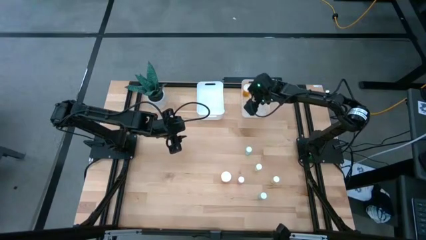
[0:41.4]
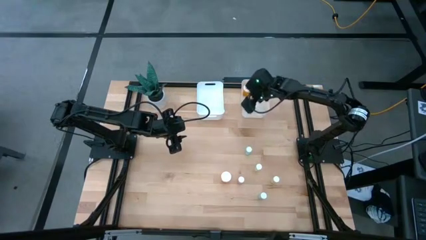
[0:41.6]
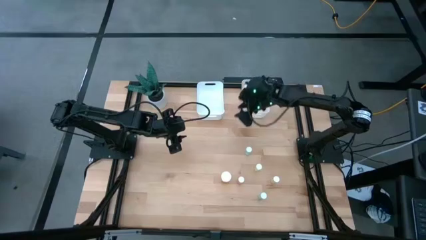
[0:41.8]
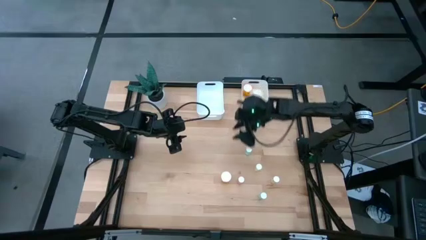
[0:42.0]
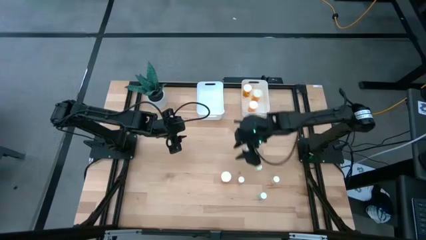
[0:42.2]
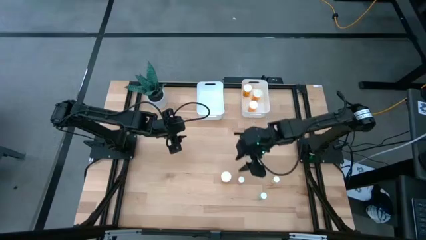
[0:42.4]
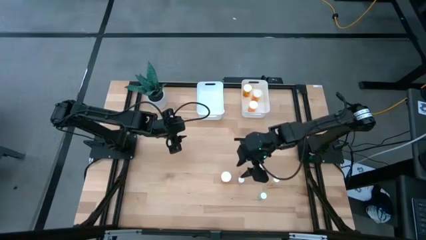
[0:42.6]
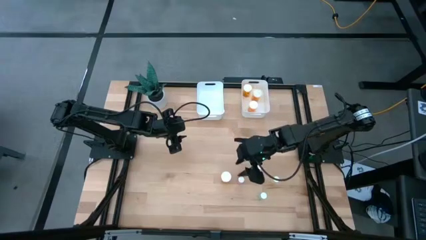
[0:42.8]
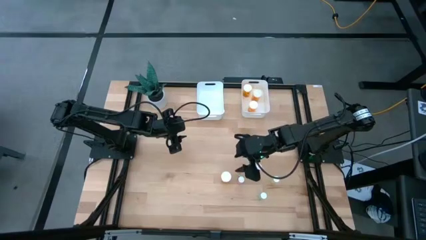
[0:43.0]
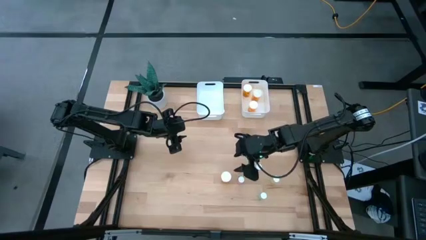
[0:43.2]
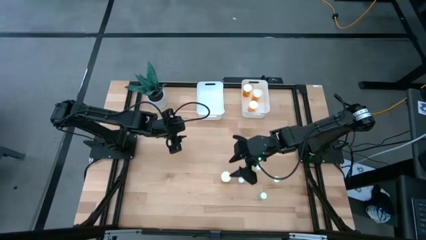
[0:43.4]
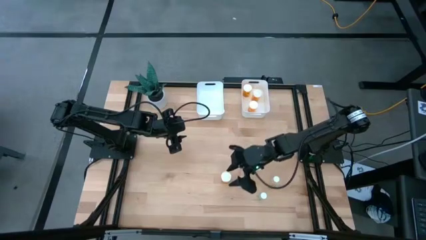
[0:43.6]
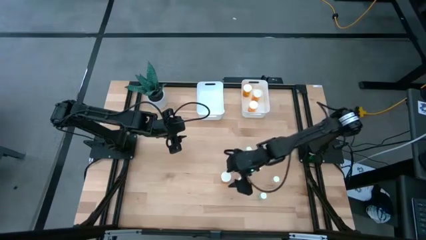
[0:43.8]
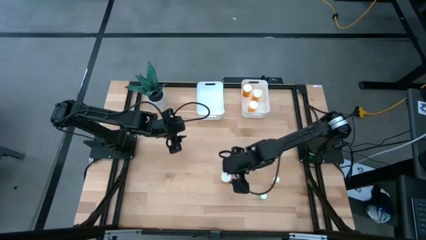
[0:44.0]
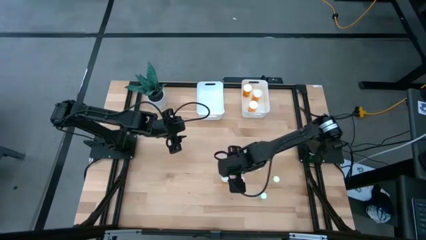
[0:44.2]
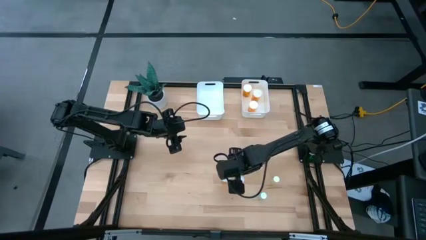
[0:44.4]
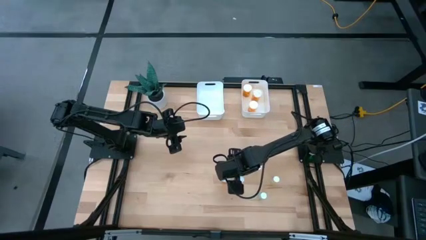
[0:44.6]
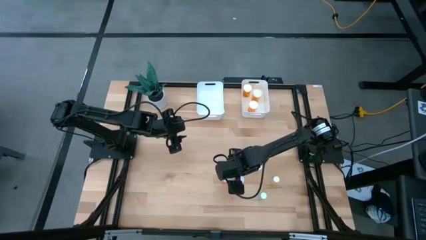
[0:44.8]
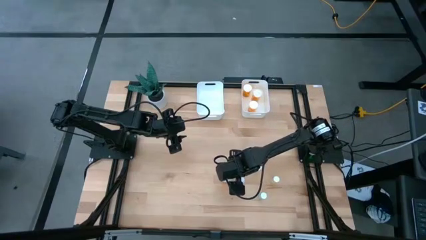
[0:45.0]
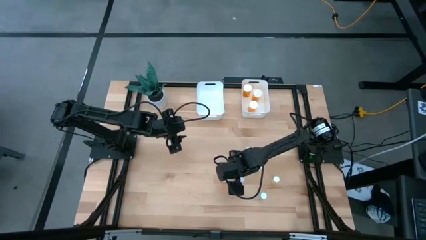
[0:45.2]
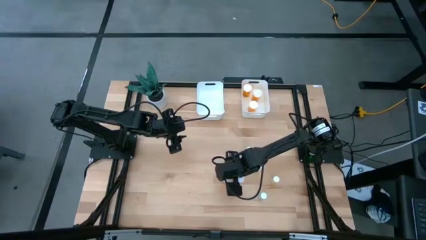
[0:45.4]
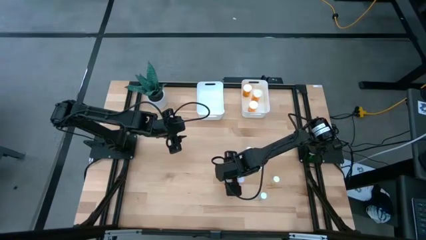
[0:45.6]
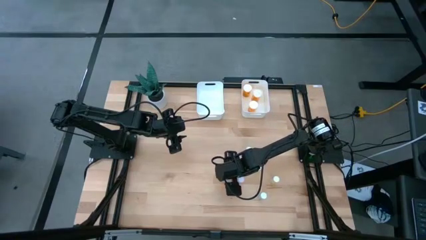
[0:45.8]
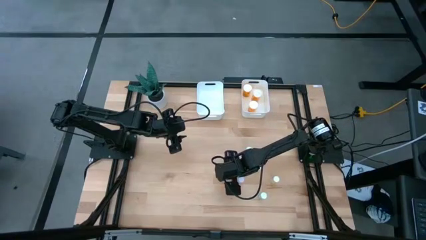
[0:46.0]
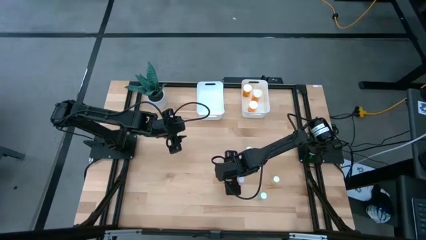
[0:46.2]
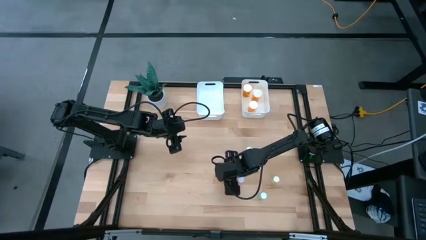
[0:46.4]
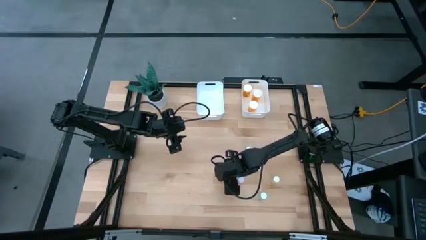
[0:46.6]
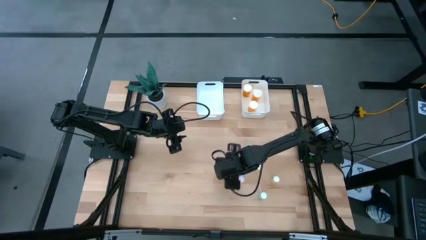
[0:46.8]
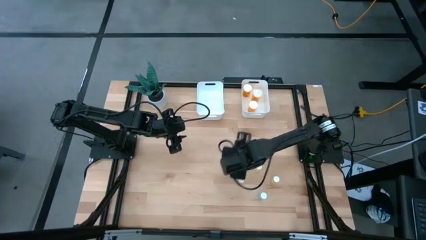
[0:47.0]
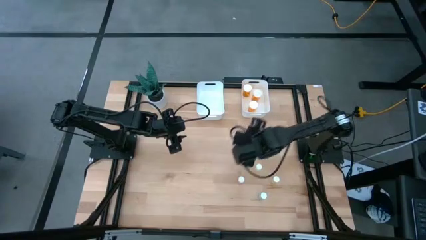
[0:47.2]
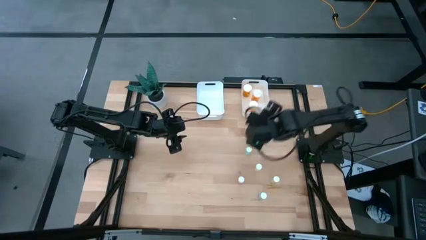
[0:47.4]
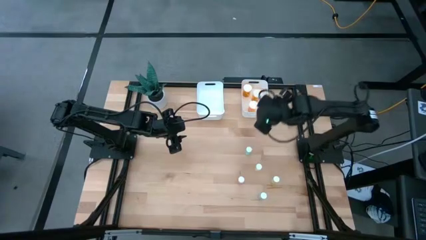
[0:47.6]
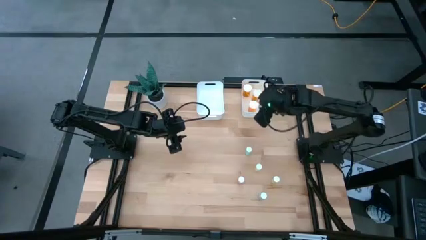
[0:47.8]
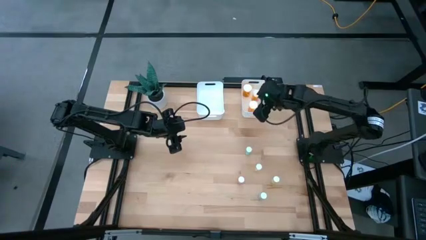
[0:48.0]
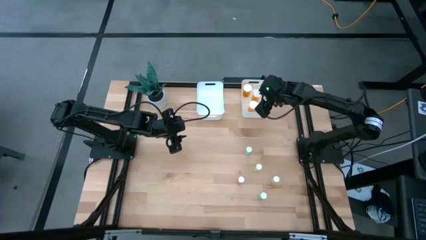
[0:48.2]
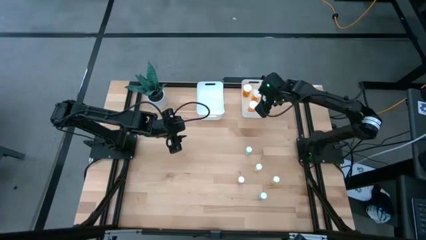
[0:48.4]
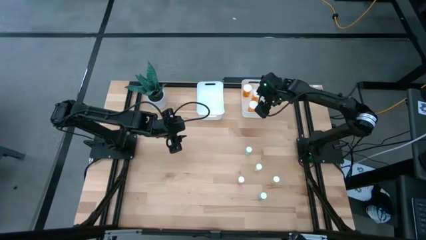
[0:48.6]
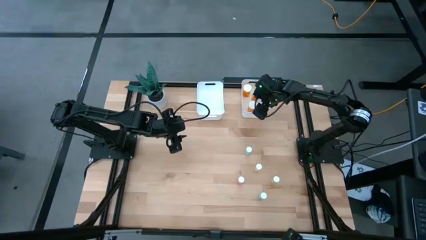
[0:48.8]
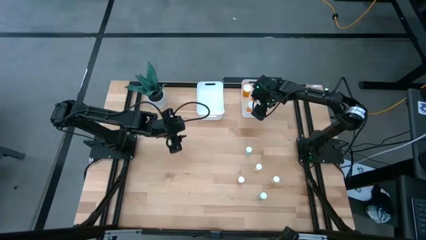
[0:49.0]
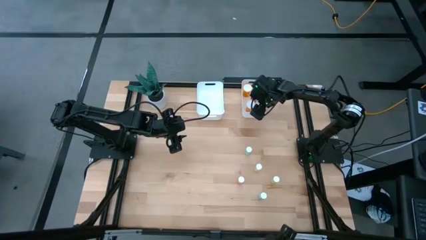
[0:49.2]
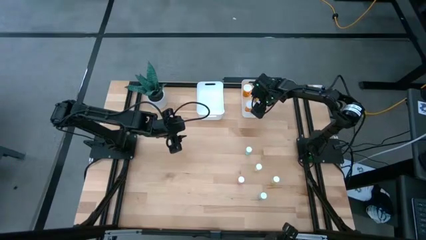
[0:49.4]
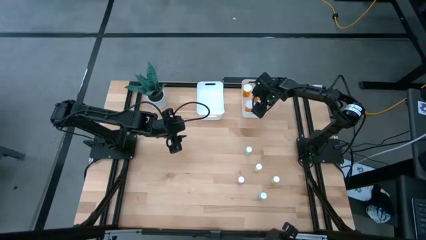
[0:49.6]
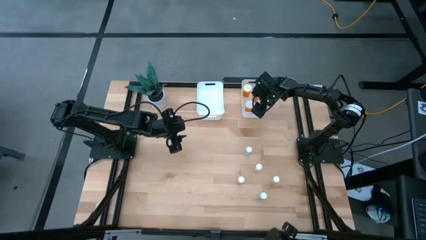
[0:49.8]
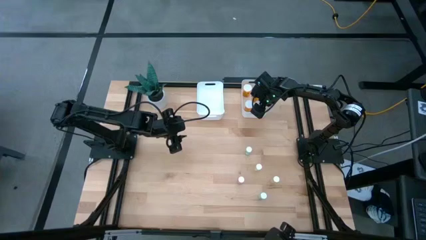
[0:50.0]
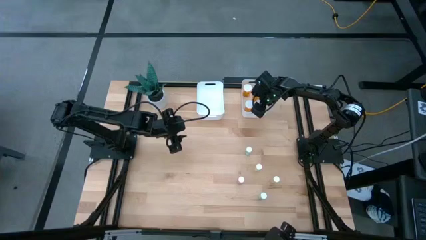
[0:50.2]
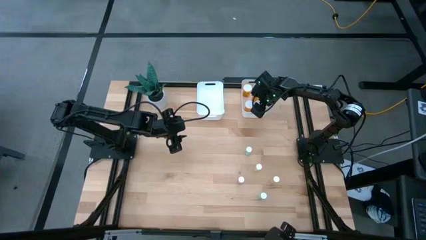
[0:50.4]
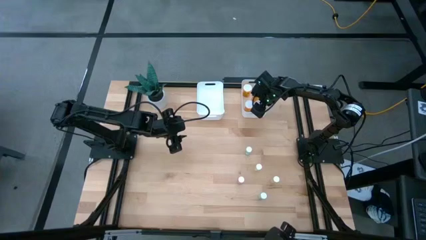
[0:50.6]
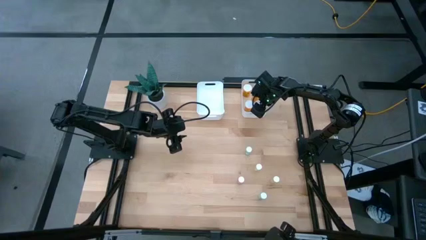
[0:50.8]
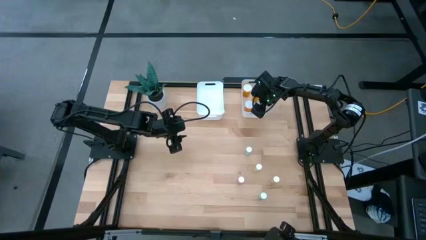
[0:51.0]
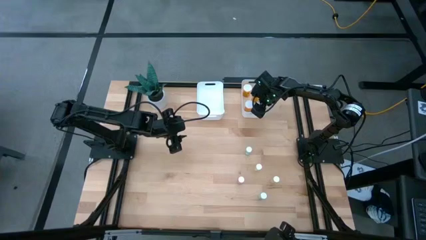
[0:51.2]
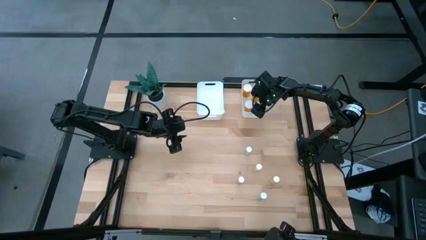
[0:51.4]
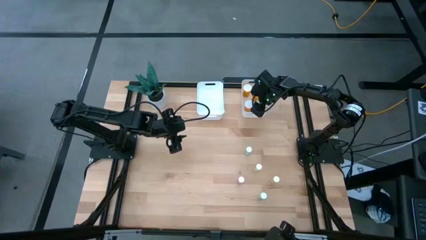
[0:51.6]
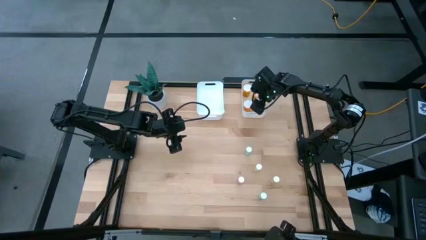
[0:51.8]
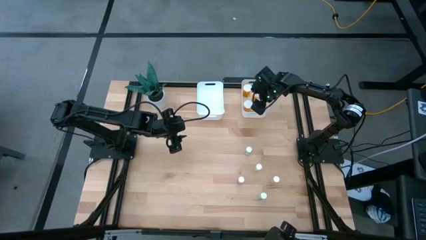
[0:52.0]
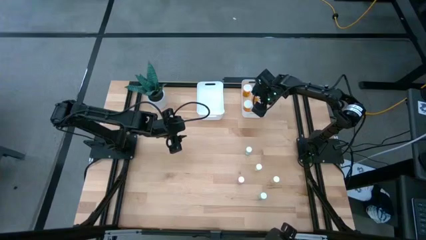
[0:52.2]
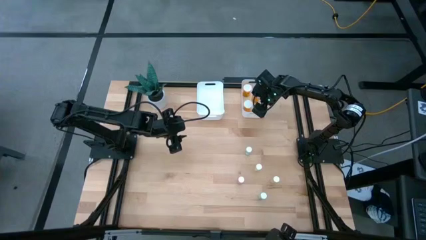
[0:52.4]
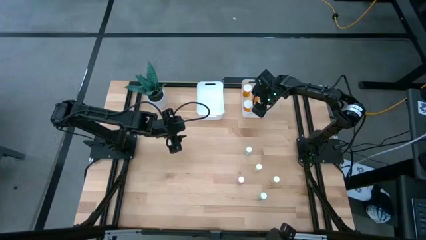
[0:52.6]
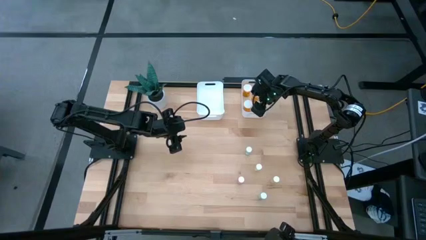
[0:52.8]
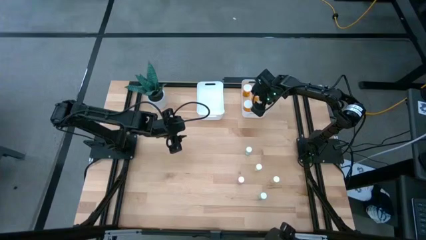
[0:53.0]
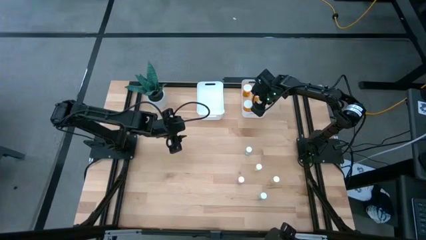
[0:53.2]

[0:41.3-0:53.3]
Task: Pick and place medicine bottles into bin by pill shape (circle, oval)
Put the big orange bottle into the right white bin

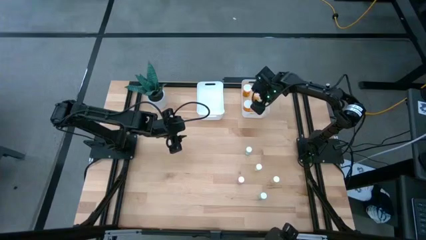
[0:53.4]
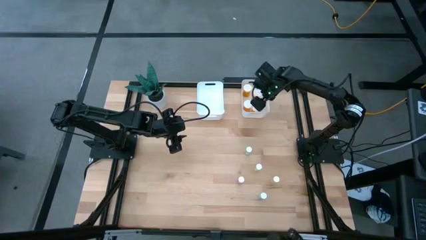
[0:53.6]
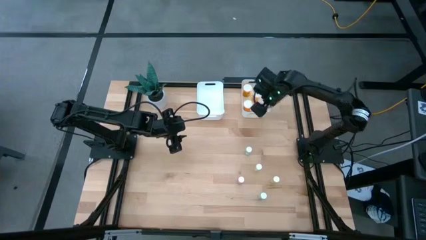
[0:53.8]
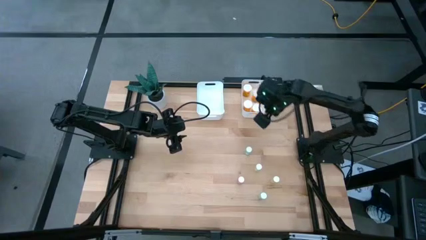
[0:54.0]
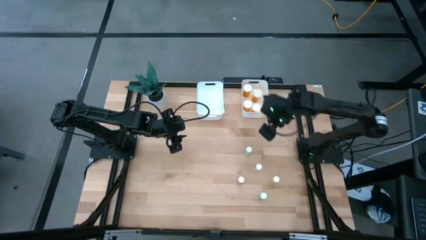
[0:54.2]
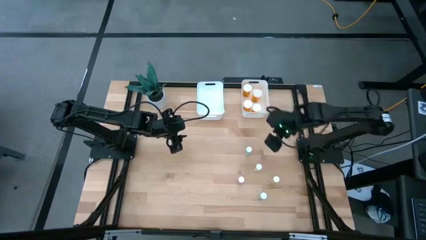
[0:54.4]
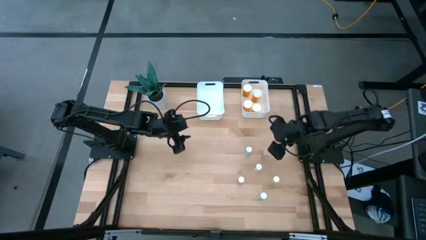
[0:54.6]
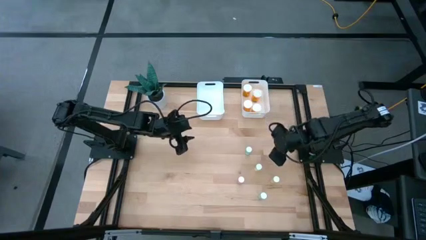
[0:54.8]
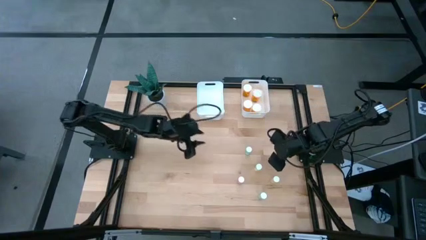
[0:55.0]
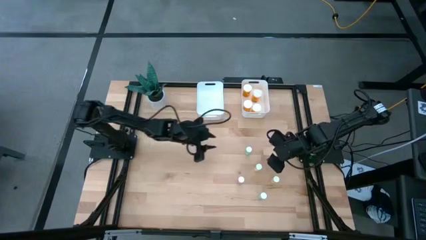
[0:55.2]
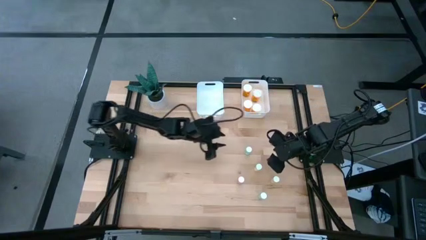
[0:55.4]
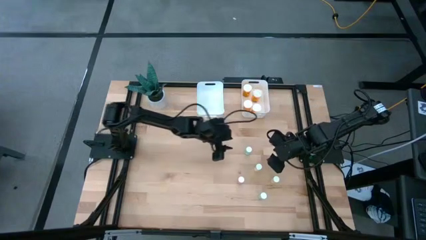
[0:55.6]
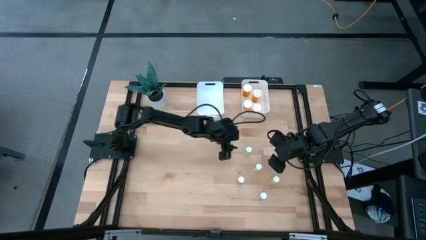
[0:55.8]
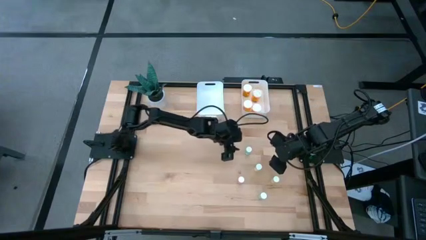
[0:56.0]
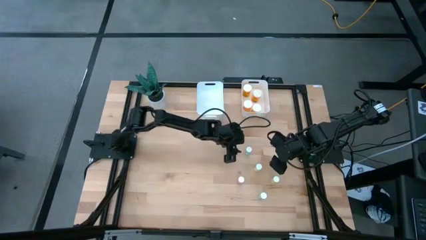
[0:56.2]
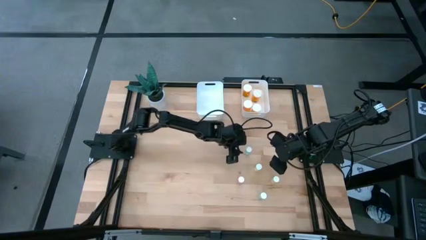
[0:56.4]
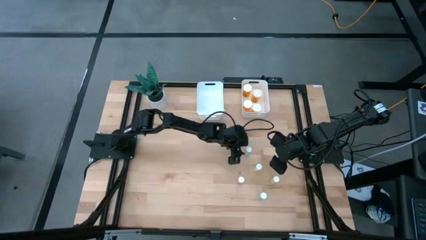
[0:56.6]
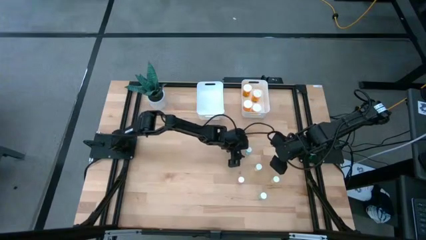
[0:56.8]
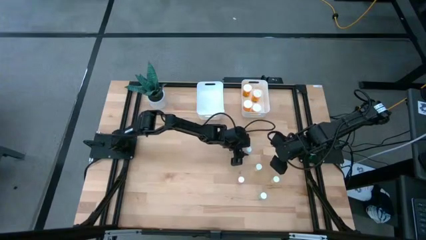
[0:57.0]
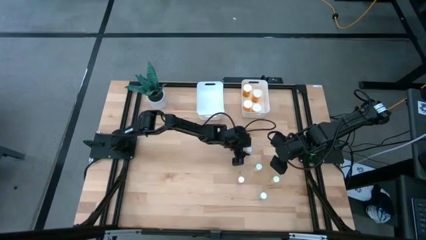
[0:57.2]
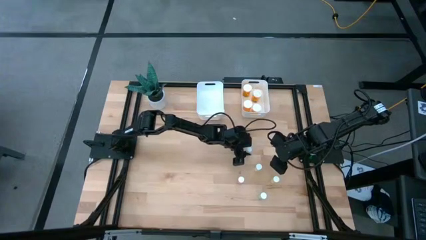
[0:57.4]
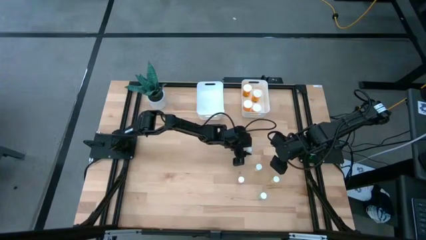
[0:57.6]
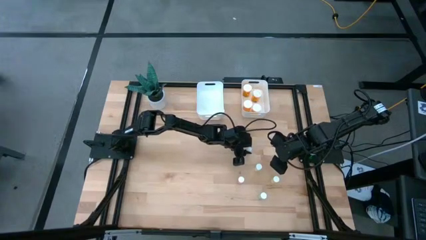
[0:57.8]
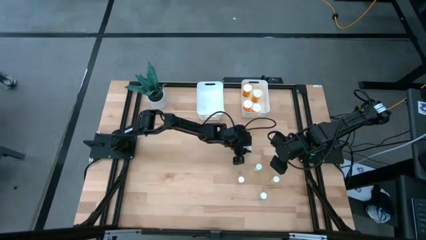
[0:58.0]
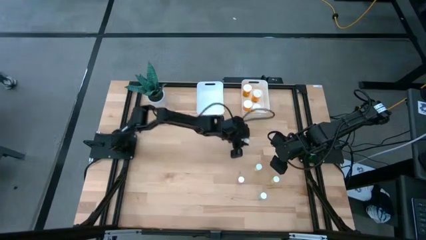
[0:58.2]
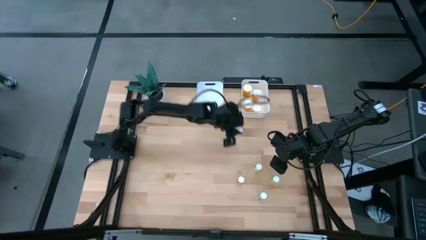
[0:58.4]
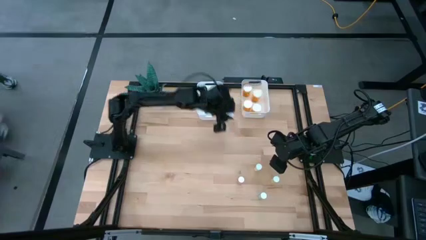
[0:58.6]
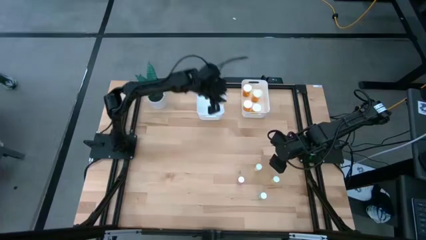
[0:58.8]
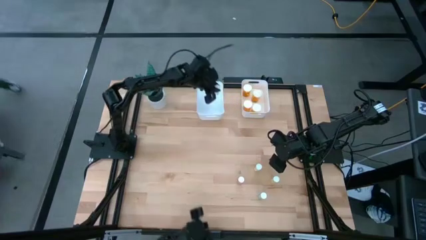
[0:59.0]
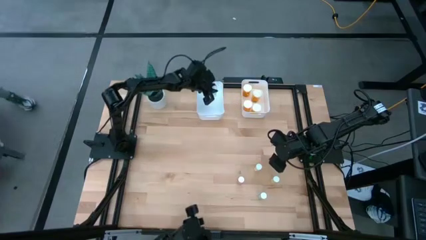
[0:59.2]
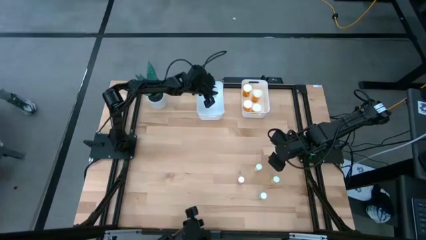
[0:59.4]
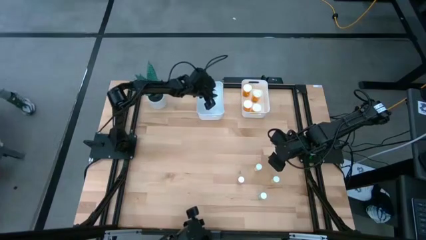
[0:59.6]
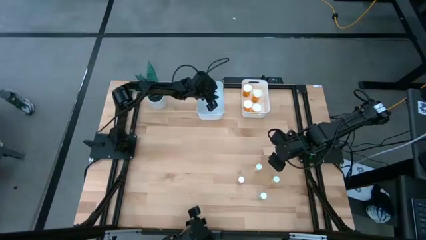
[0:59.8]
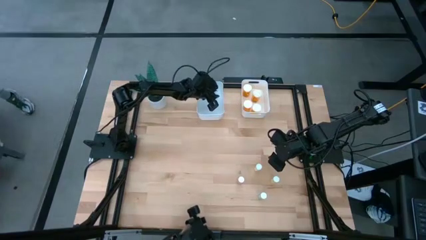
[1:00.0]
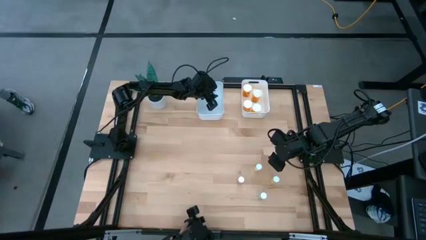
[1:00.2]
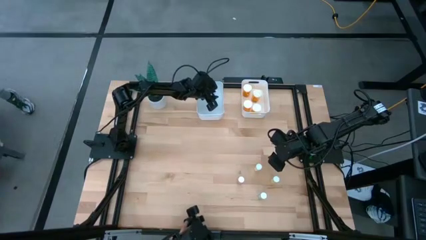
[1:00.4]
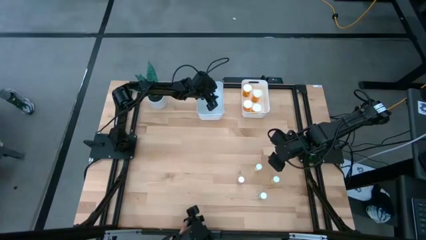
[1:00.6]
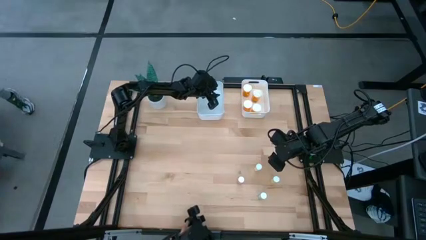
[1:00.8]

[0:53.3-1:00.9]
Put the small green tablet bottle into the left white bin
